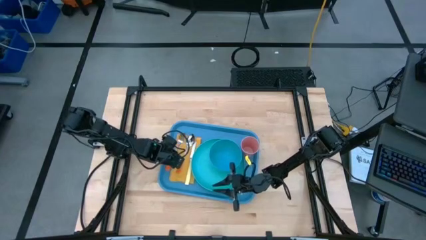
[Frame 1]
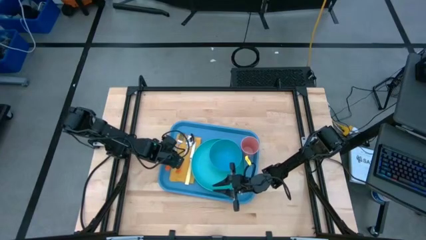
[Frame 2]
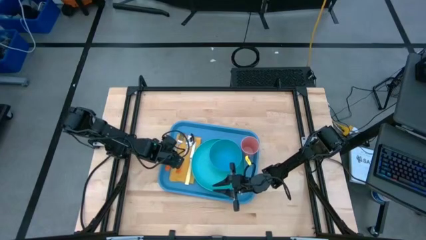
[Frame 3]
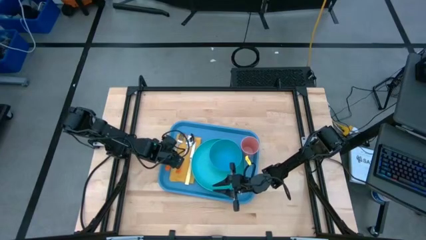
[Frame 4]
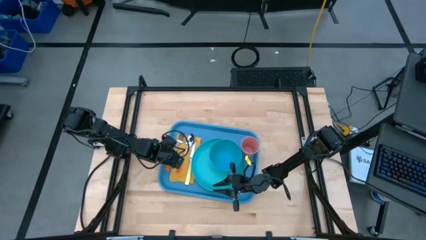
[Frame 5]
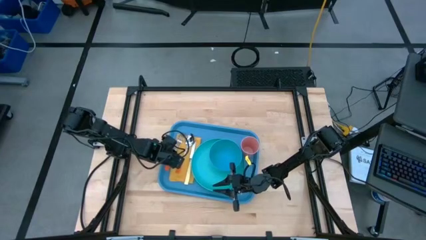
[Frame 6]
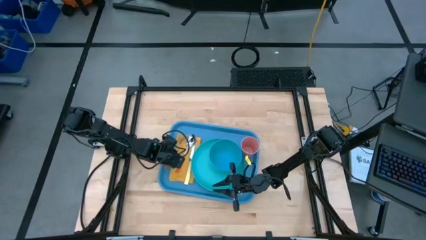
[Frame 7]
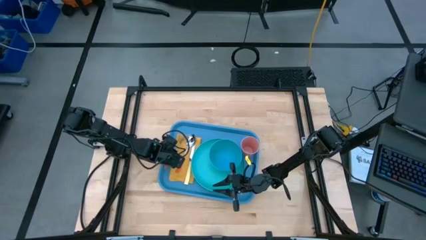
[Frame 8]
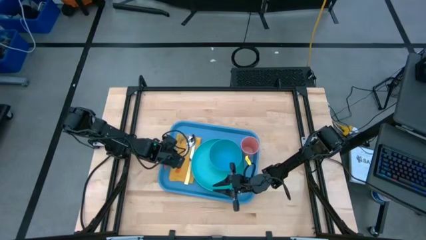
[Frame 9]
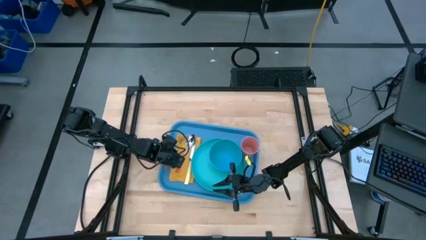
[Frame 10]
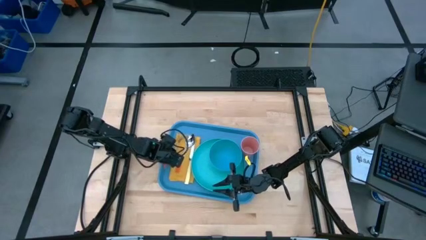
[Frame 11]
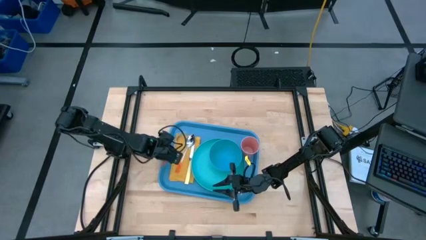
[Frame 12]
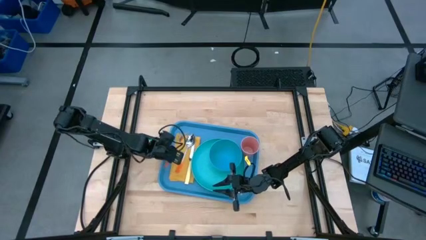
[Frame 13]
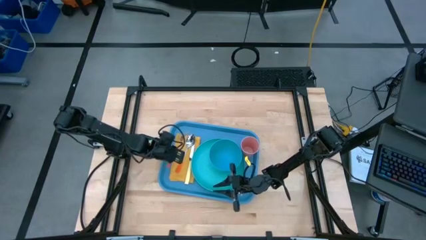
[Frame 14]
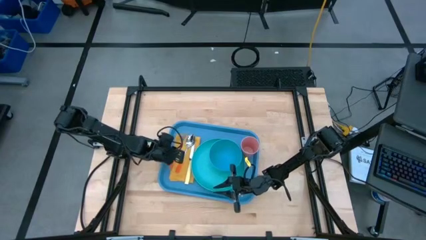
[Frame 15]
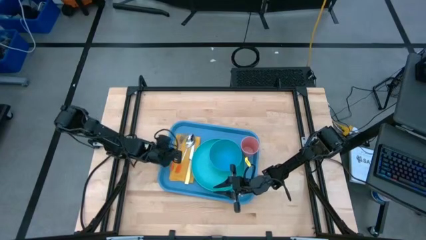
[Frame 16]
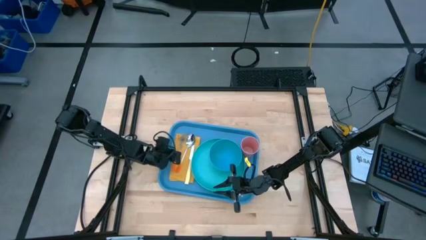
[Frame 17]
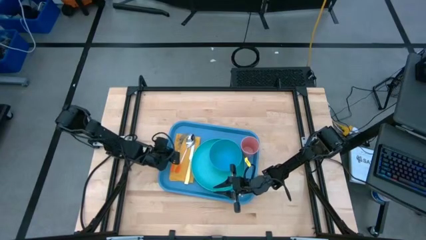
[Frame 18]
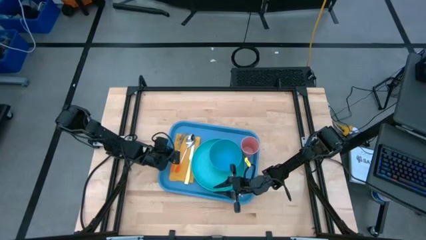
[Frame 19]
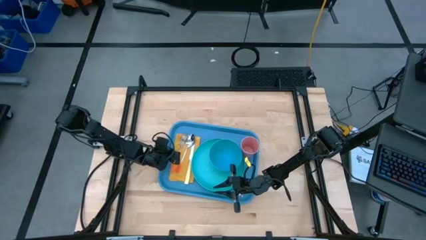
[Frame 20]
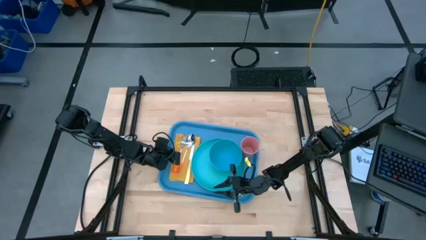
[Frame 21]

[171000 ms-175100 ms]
Task: Set up tray
Put the orange fork on the yellow napkin

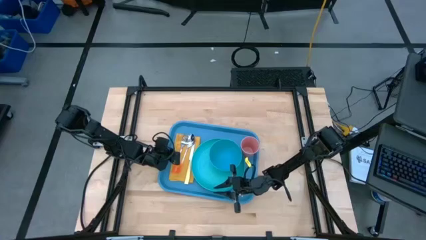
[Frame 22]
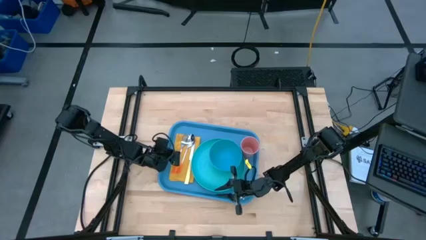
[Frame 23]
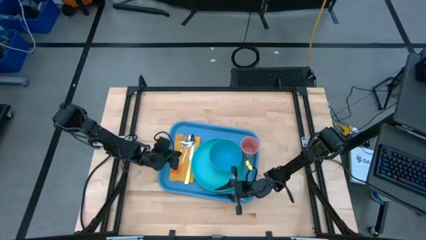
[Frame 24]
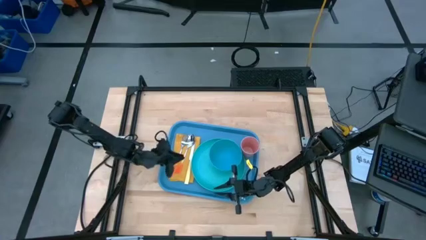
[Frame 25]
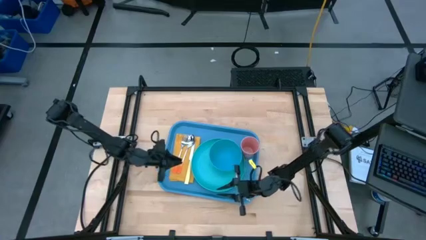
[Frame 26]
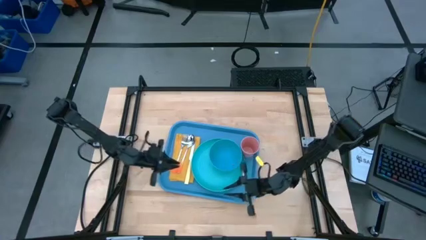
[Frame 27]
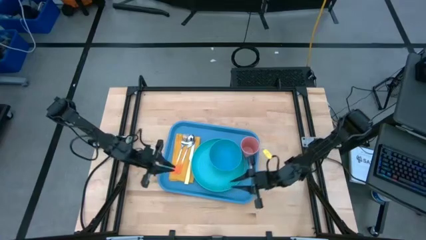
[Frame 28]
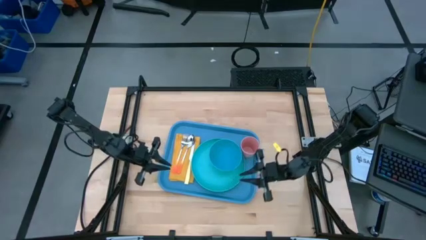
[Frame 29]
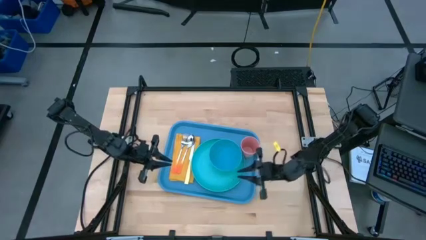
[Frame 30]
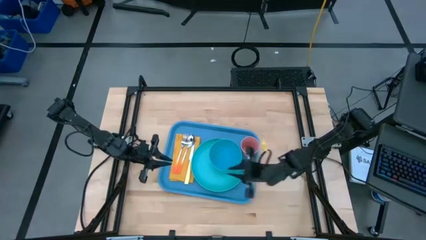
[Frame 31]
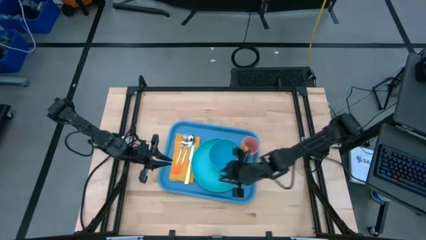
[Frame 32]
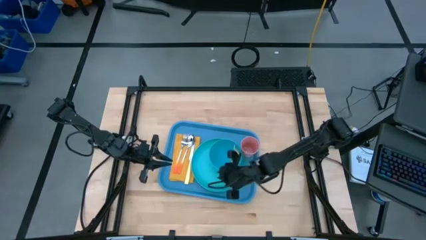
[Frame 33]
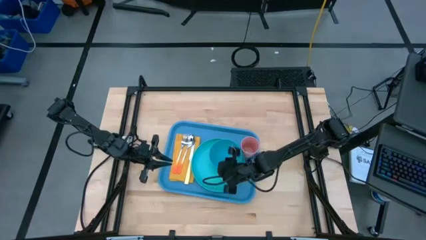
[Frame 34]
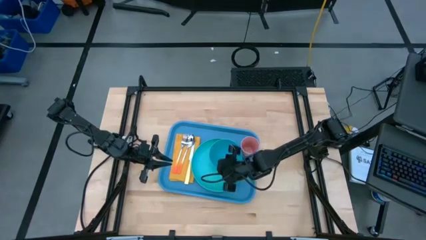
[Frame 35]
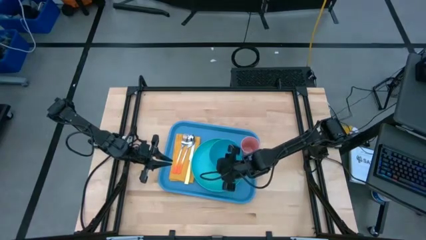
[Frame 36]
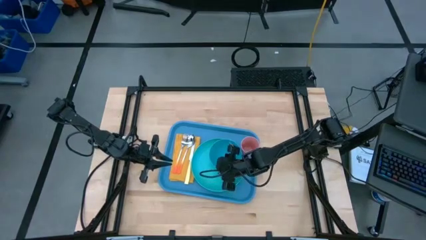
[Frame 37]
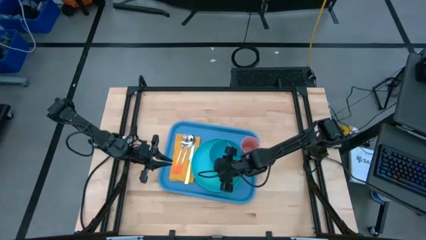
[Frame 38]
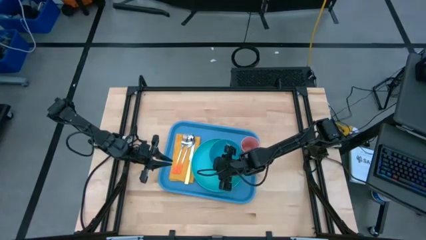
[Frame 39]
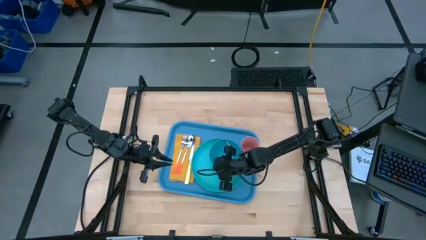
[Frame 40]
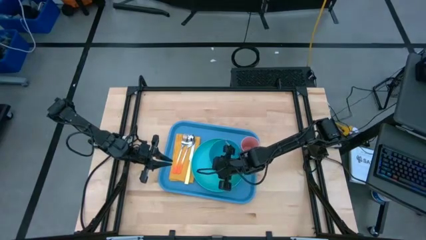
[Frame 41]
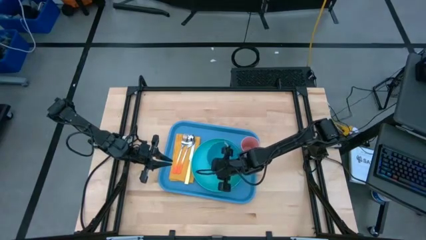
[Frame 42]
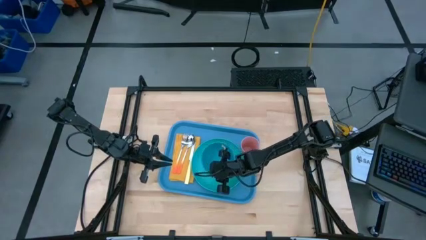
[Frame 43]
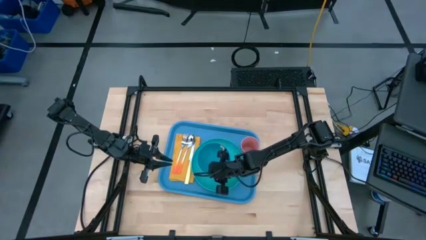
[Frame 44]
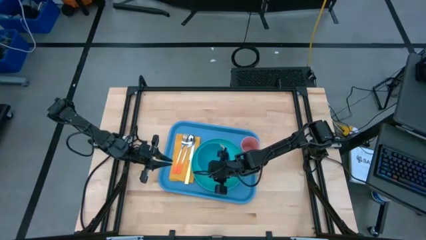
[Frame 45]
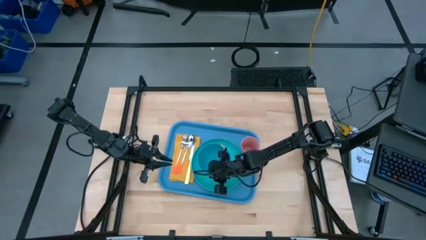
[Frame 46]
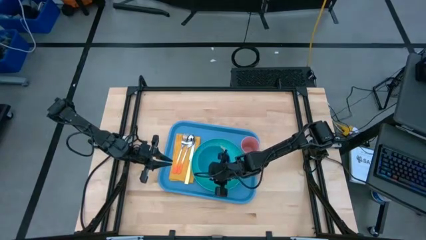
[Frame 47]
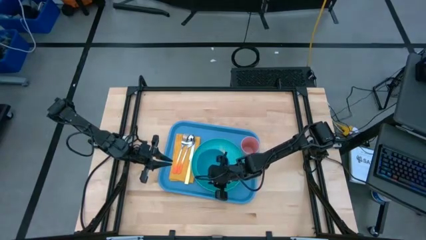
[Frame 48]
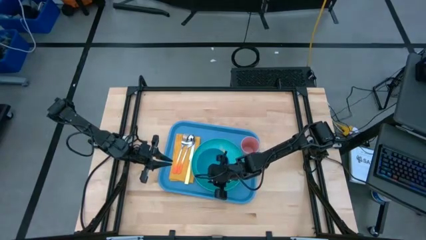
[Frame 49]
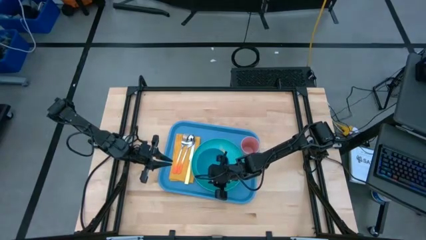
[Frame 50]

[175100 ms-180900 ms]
Move the blue bowl to the bottom left of the green plate

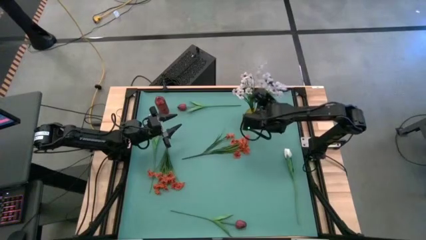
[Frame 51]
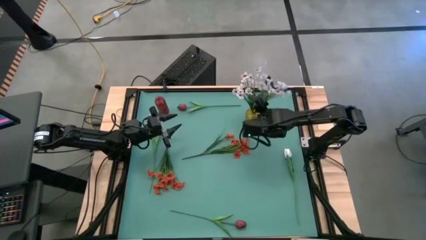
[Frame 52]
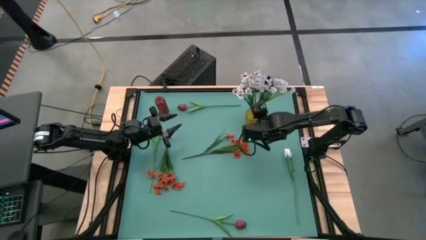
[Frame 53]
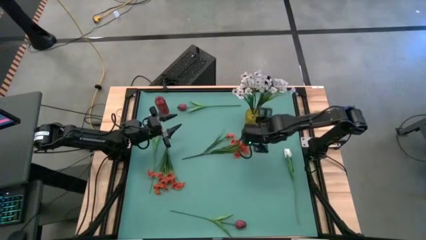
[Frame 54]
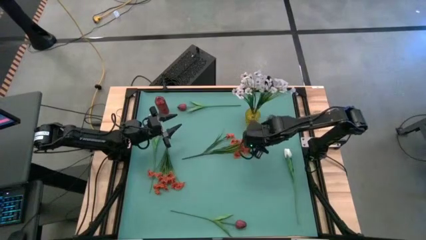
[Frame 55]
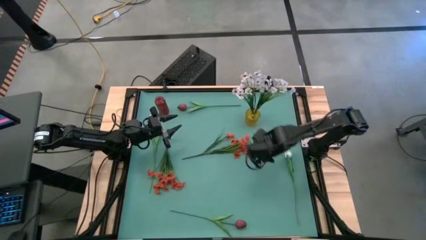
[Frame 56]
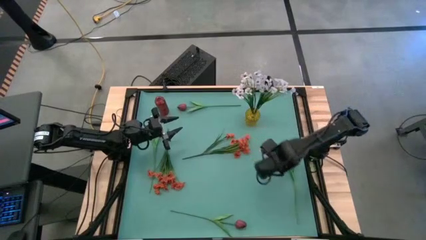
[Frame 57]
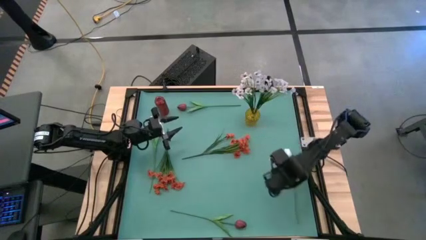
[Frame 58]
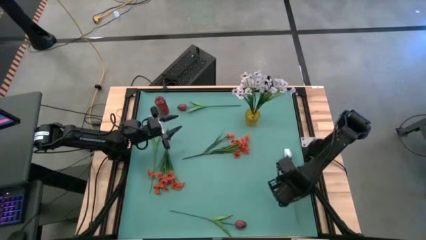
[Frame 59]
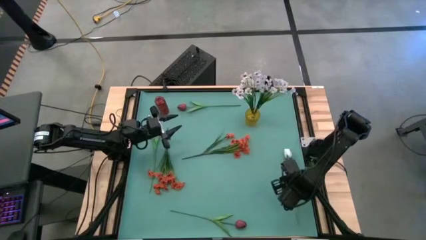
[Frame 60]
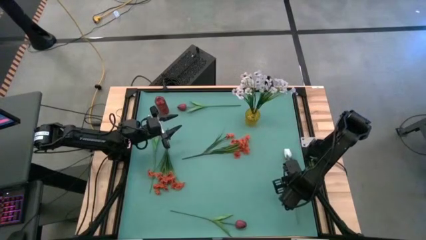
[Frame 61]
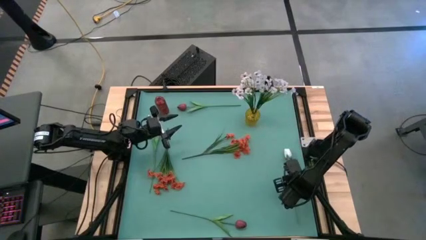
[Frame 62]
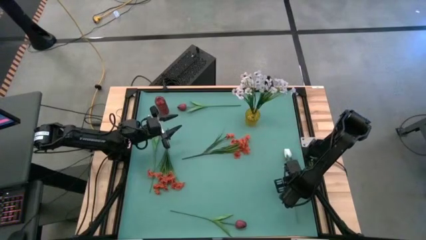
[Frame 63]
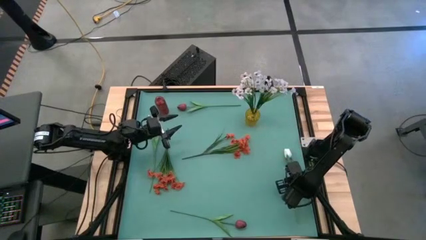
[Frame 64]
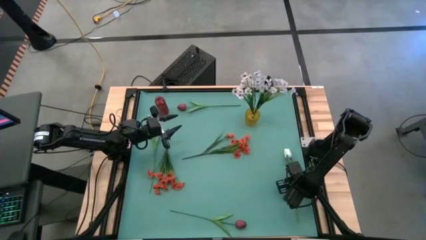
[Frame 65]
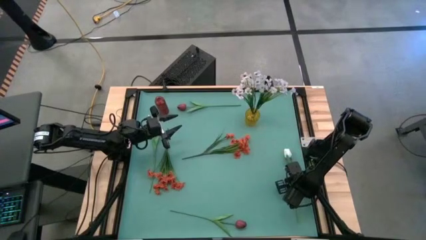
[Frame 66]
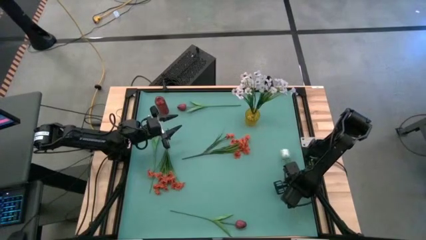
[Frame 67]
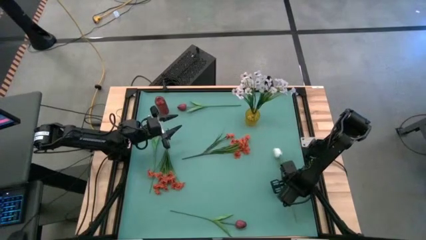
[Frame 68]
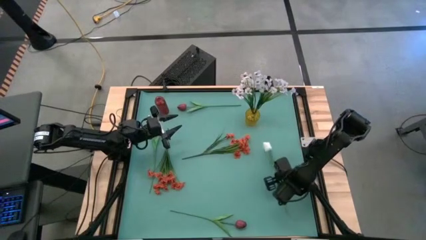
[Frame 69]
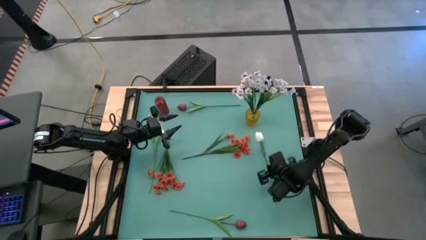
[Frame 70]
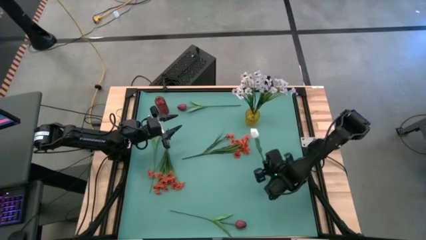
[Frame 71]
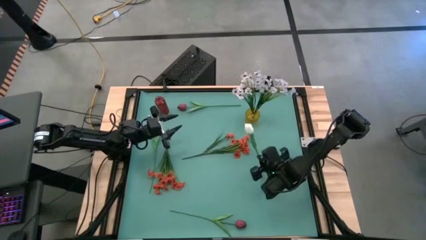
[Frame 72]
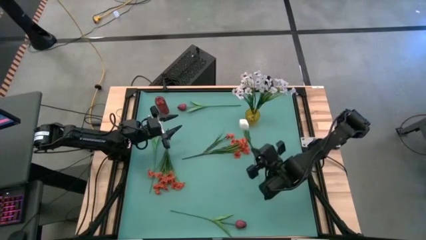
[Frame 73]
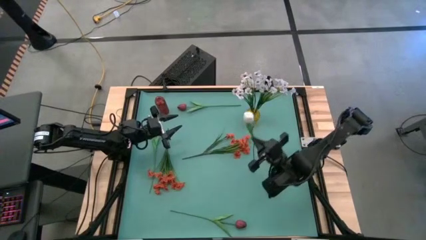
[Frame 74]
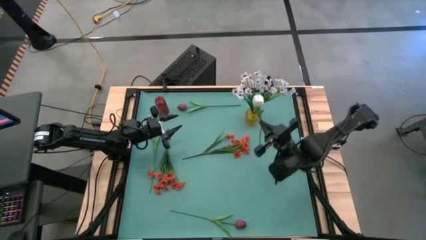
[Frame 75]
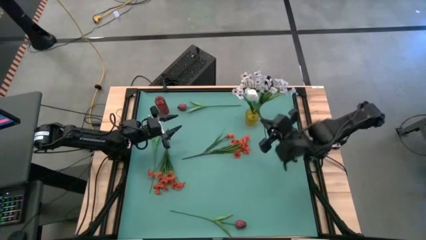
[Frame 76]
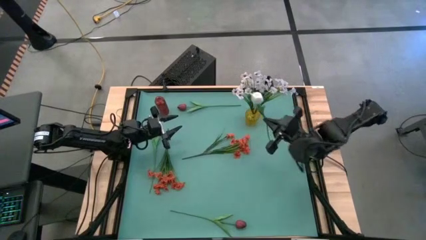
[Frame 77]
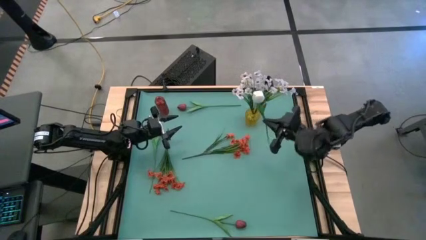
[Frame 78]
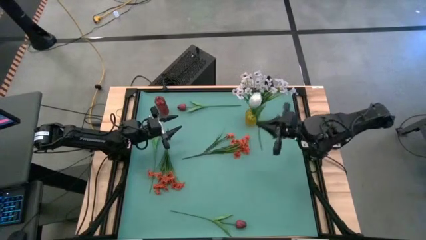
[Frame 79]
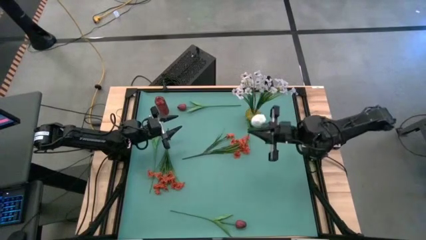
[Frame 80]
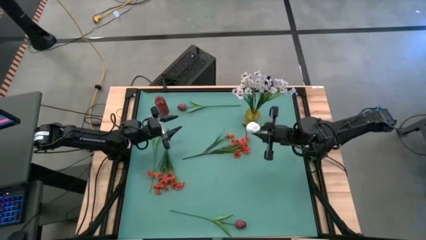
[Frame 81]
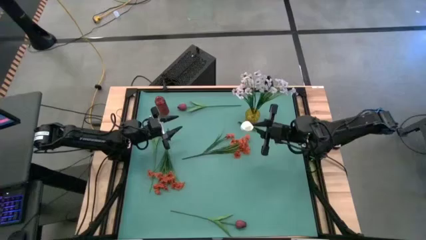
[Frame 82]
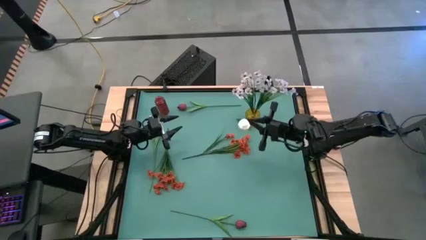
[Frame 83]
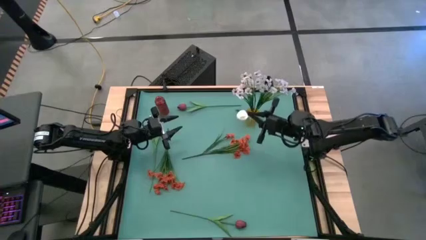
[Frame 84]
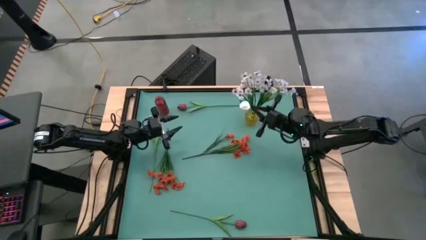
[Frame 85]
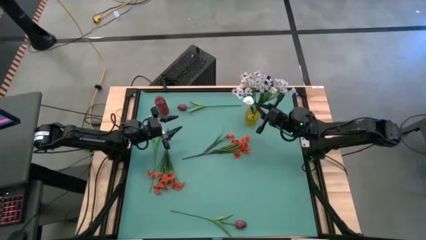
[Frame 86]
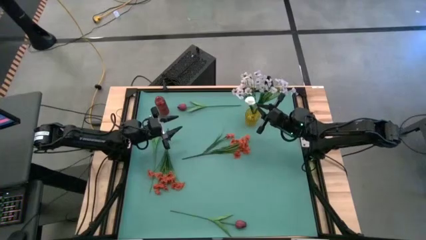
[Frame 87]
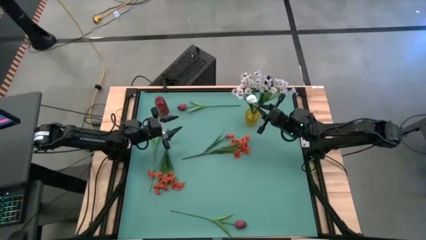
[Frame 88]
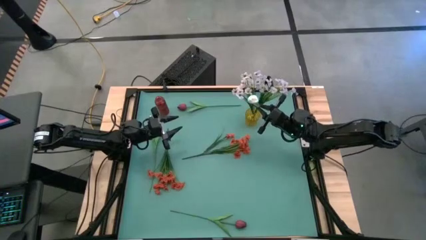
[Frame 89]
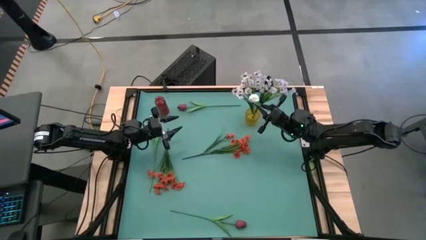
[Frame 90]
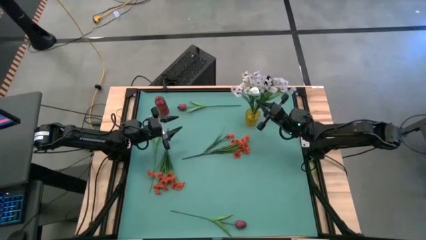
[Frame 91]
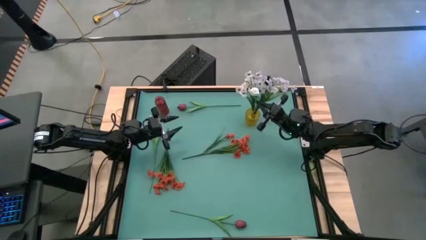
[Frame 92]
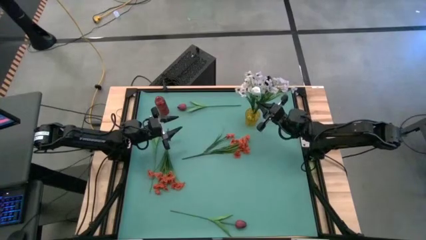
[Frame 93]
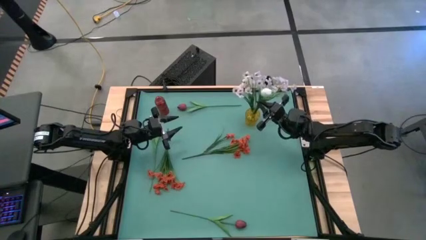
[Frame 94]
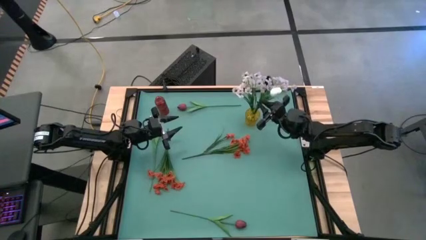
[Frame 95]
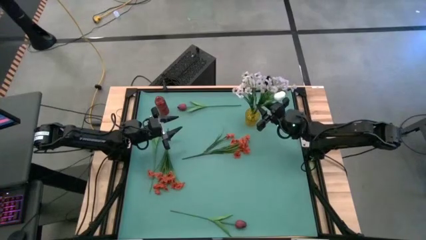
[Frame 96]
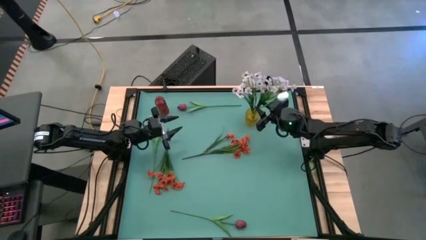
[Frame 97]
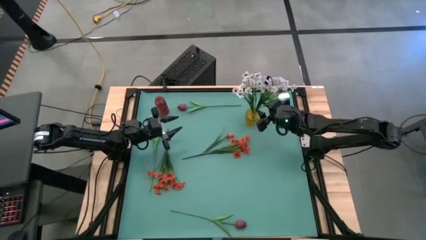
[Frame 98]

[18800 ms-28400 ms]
Task: Sort flowers into vase by color
Put the right white tulip into the yellow flower vase
